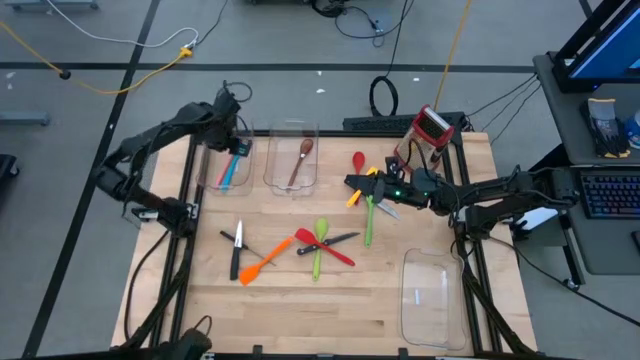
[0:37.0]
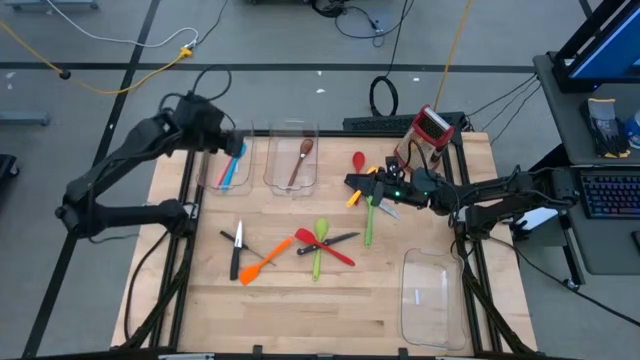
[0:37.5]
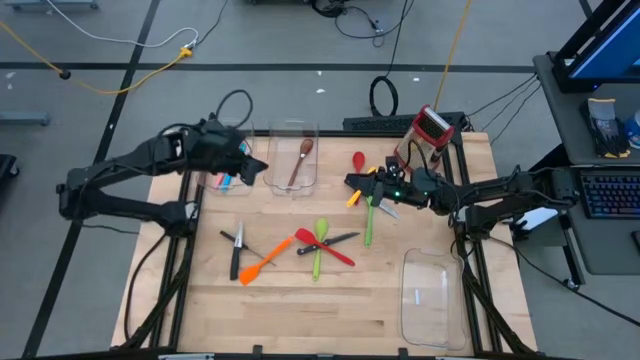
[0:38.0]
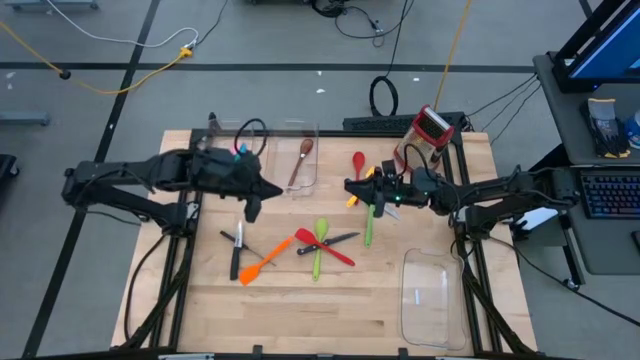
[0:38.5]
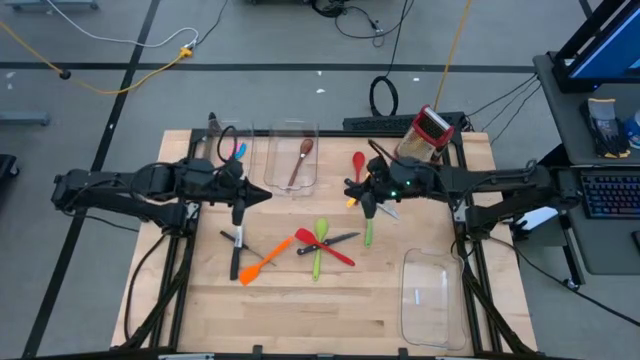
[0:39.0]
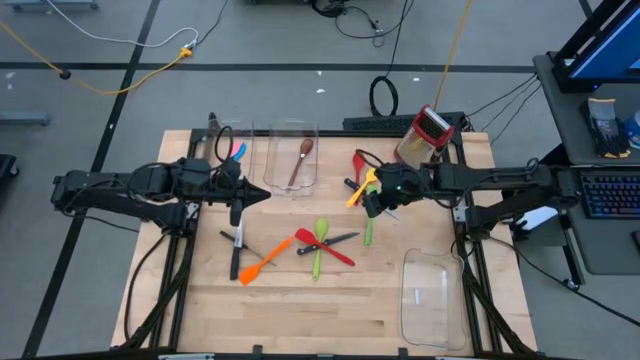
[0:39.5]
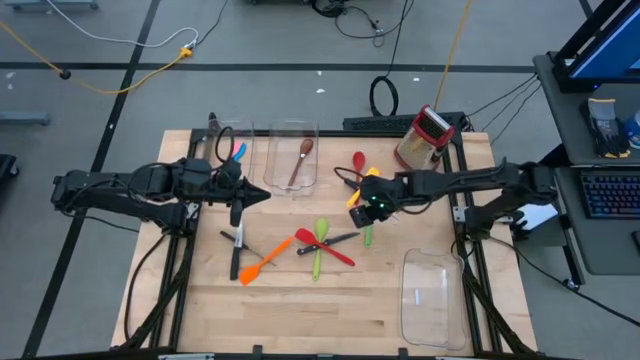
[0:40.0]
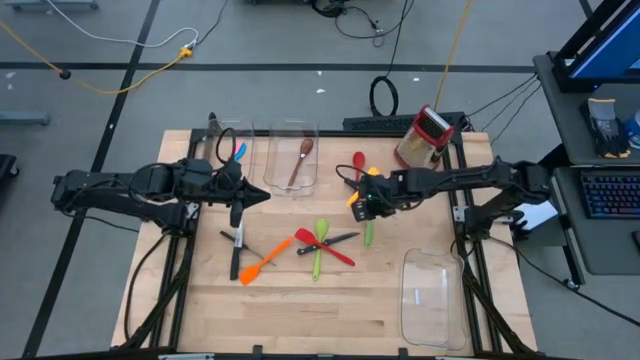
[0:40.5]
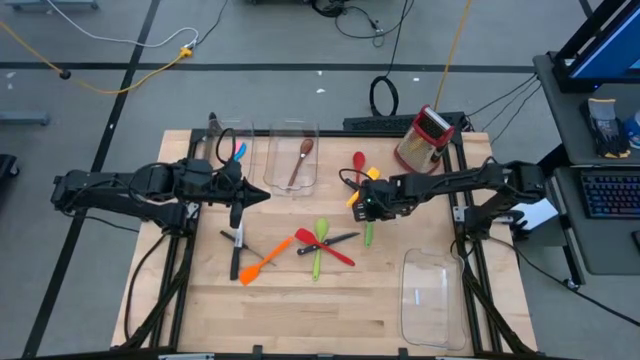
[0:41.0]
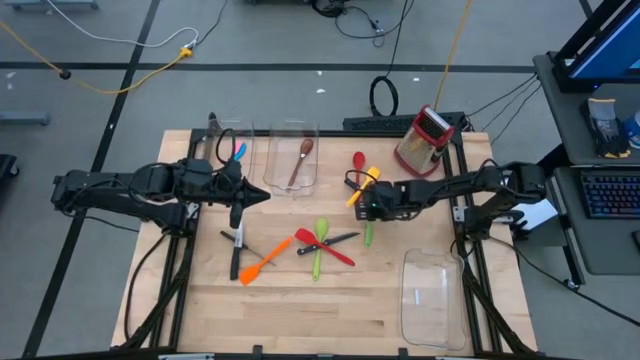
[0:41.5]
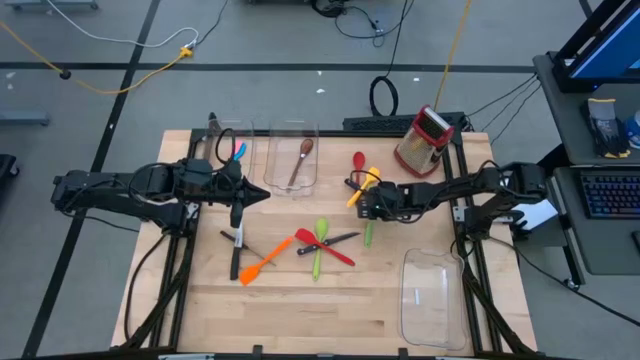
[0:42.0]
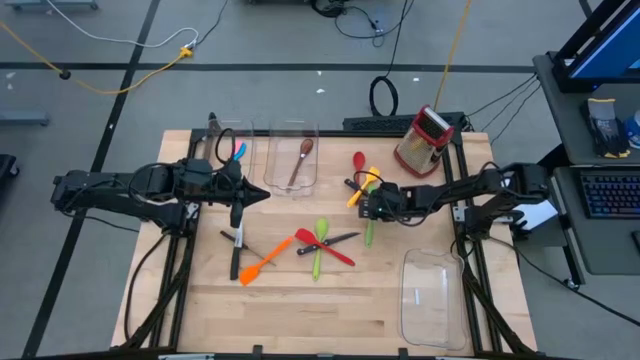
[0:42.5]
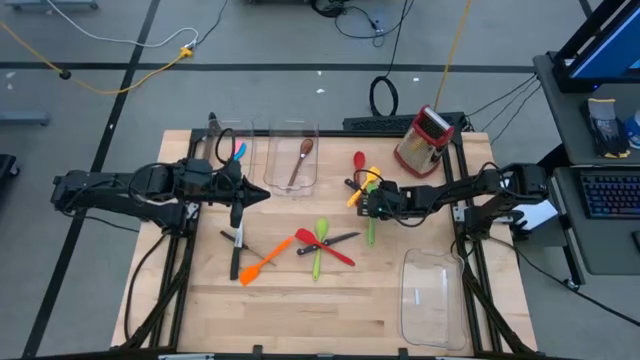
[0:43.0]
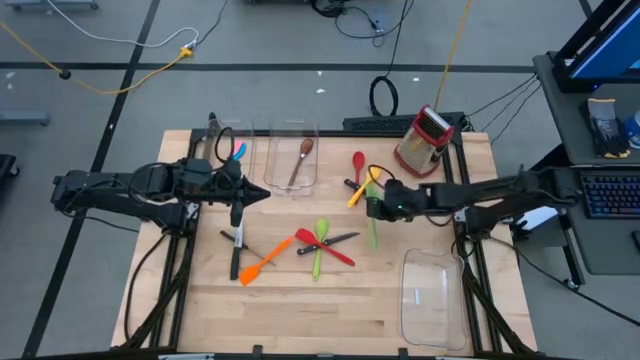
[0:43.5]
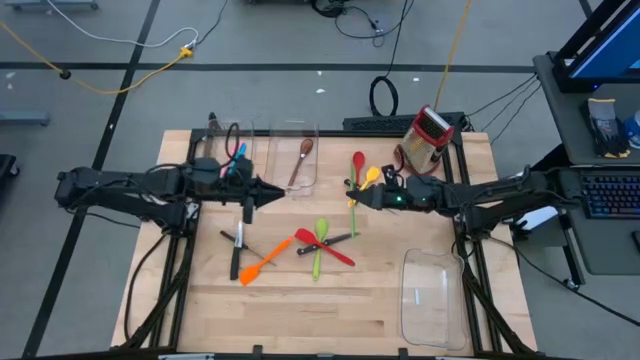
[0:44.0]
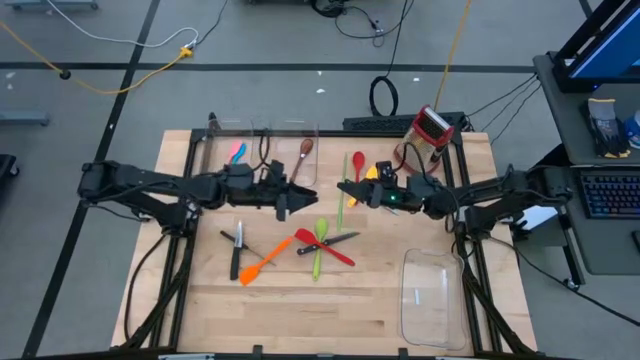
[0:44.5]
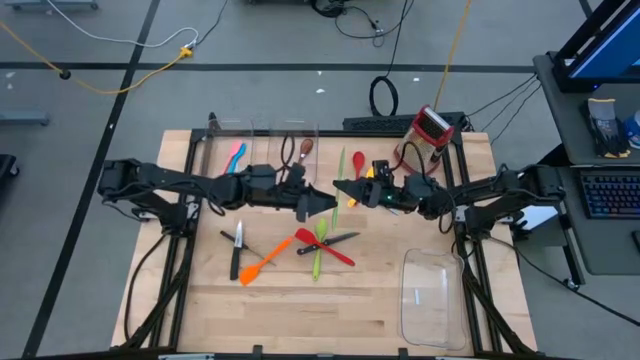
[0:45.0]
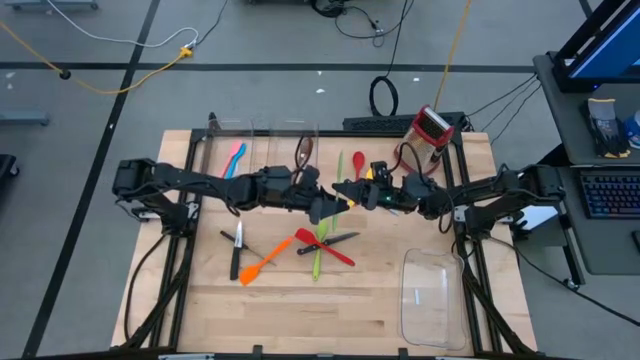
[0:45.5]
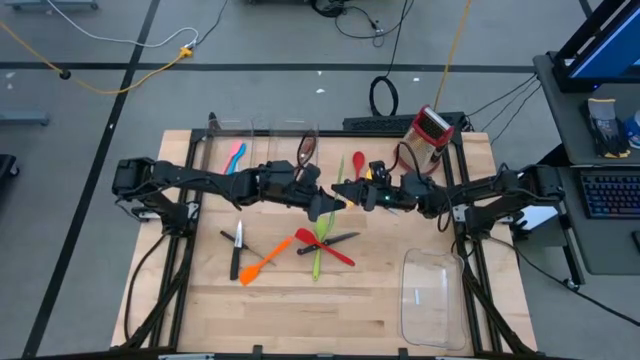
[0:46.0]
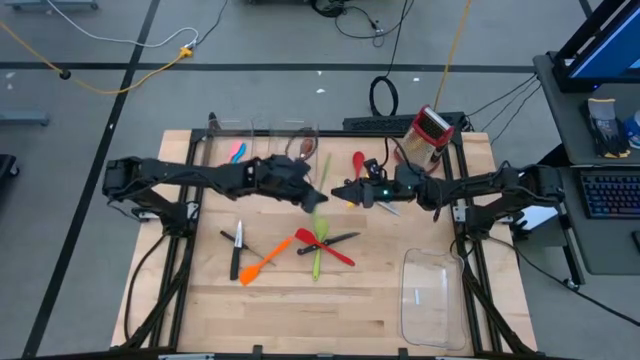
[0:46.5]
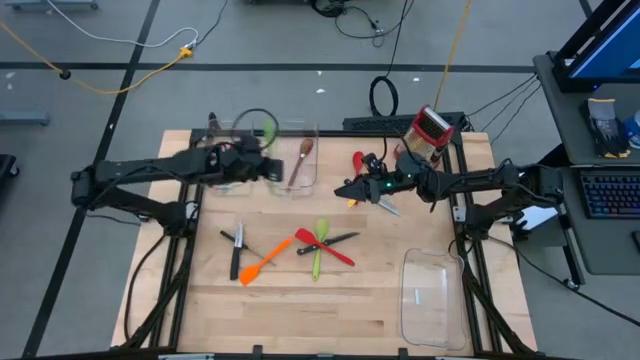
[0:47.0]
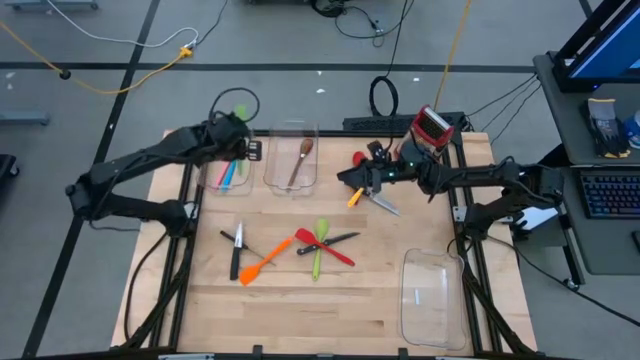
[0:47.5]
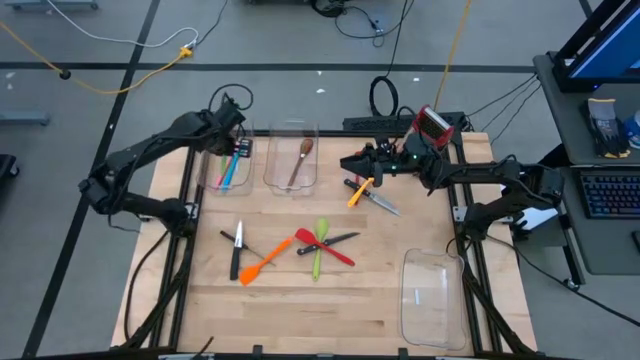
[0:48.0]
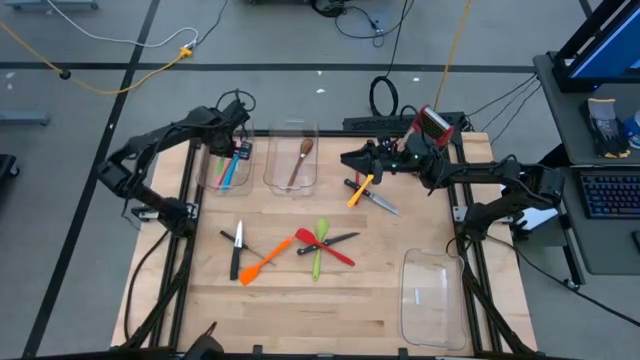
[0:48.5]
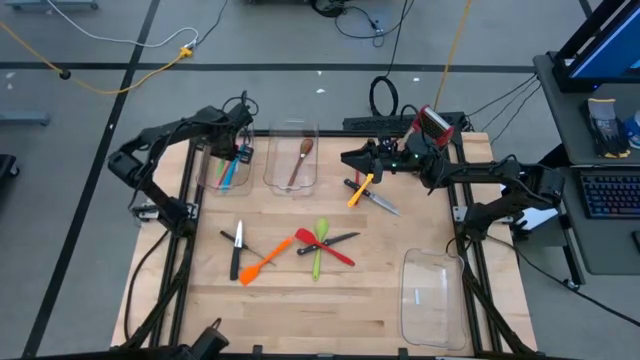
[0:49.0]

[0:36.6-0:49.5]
Task: Pick & Place Kitchen Items
Put the green spatula into the left transparent bin

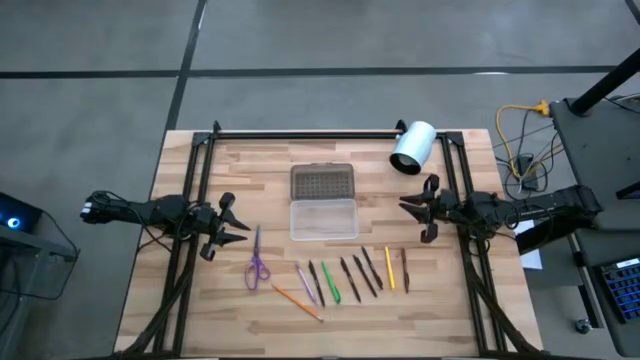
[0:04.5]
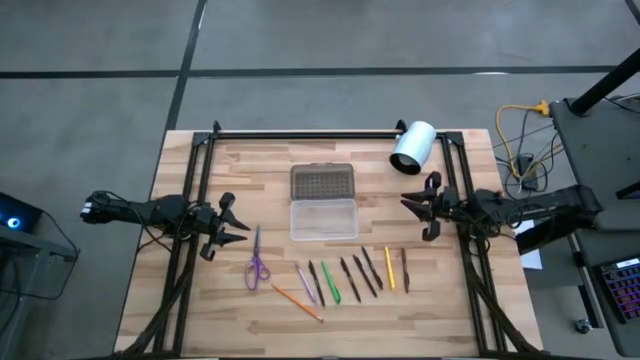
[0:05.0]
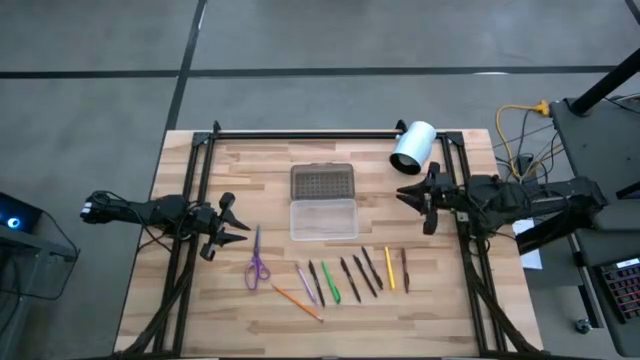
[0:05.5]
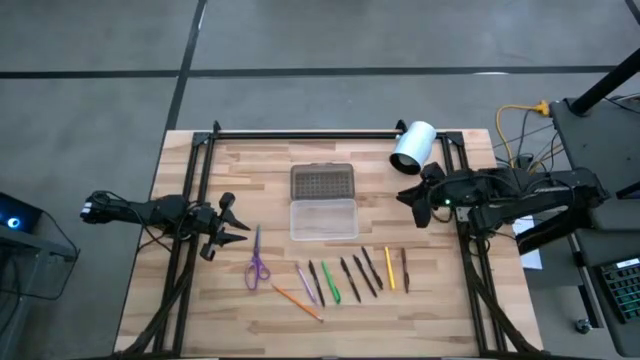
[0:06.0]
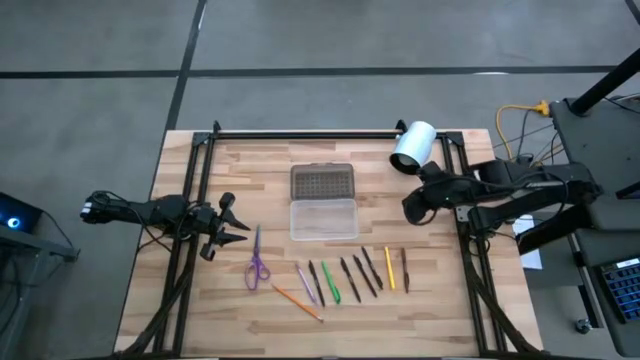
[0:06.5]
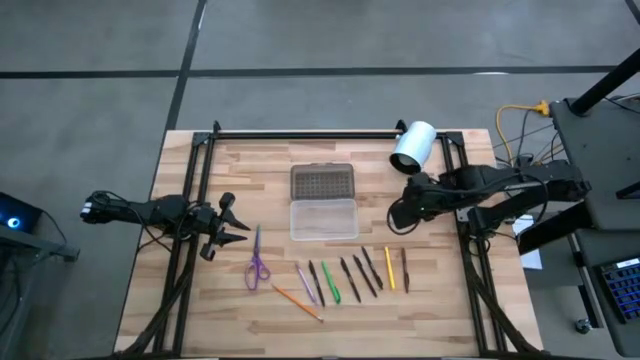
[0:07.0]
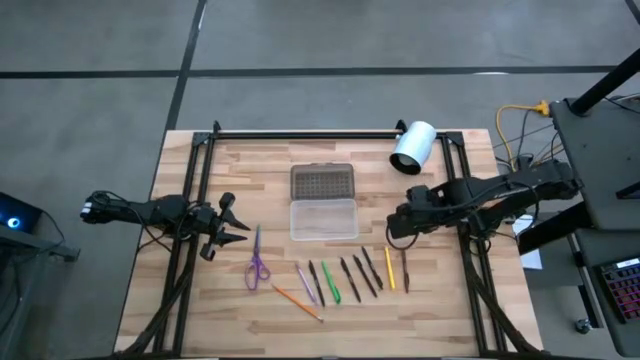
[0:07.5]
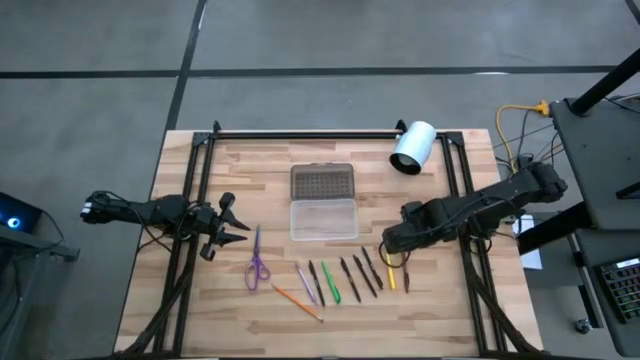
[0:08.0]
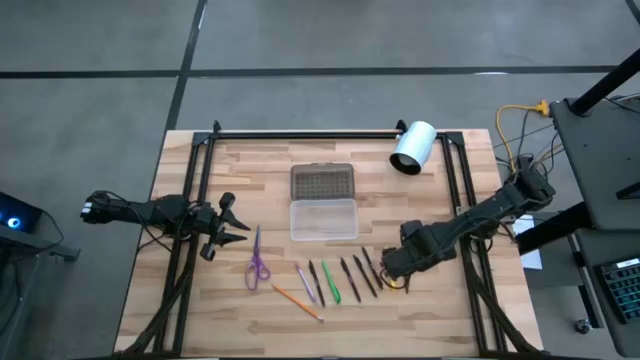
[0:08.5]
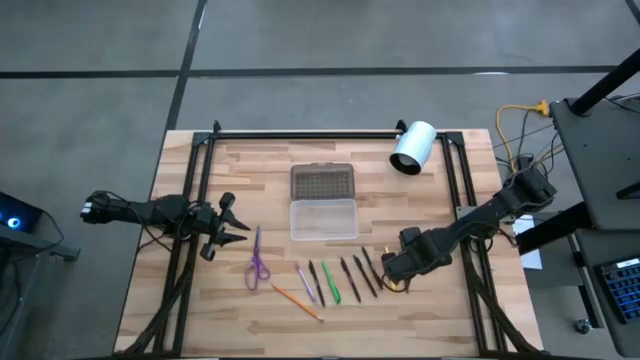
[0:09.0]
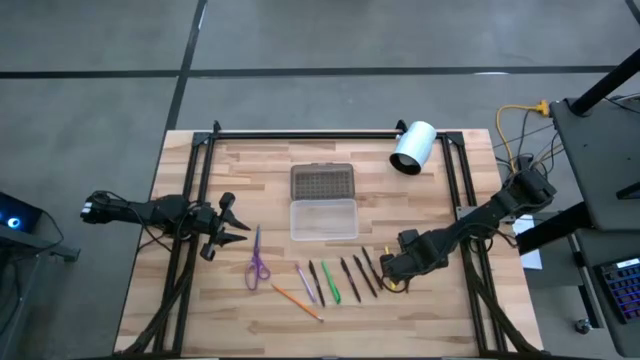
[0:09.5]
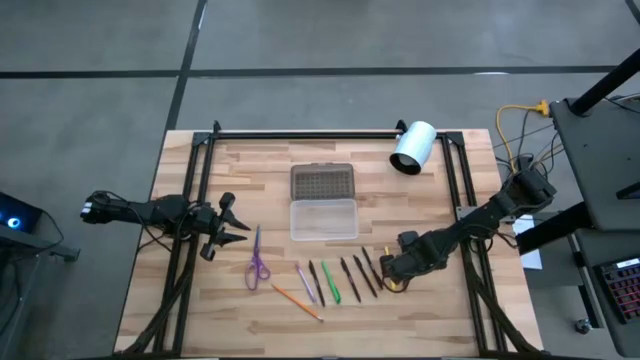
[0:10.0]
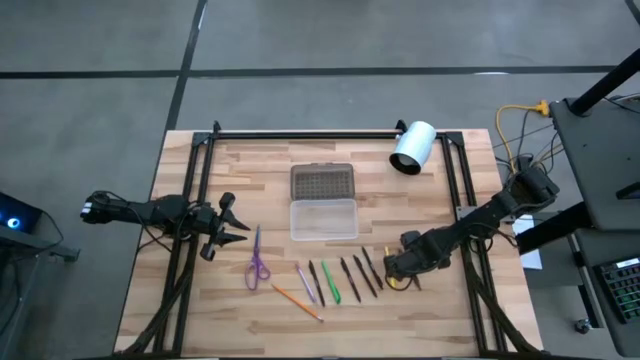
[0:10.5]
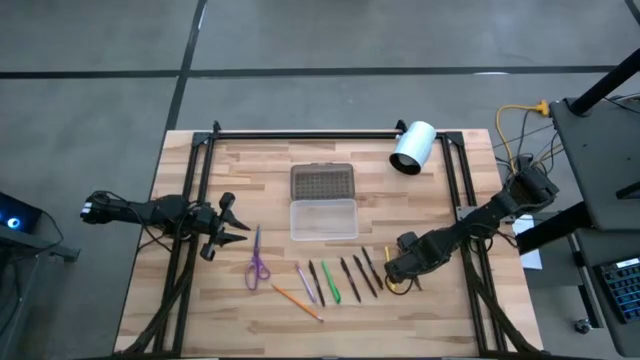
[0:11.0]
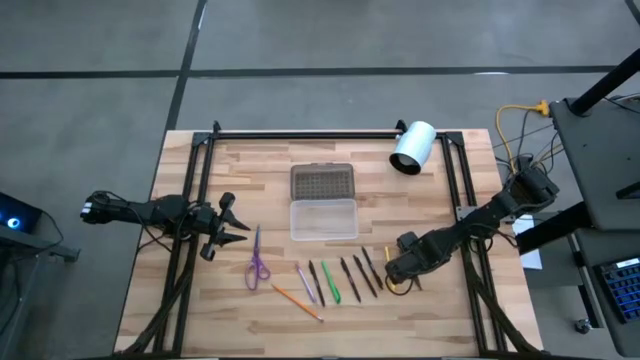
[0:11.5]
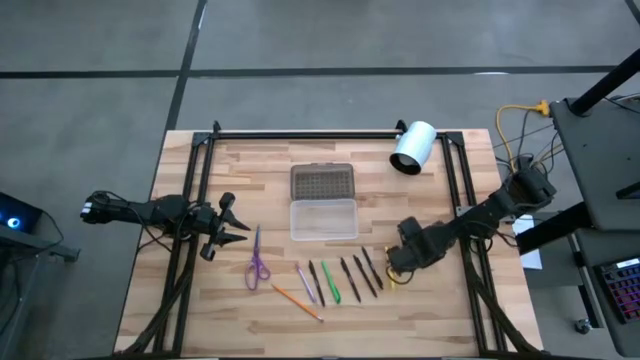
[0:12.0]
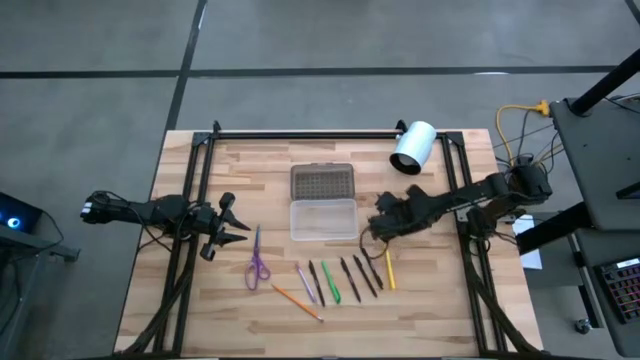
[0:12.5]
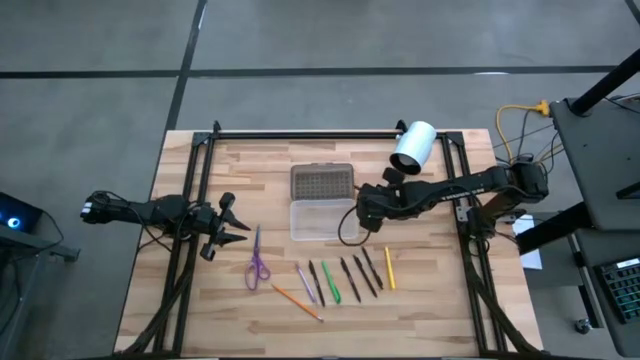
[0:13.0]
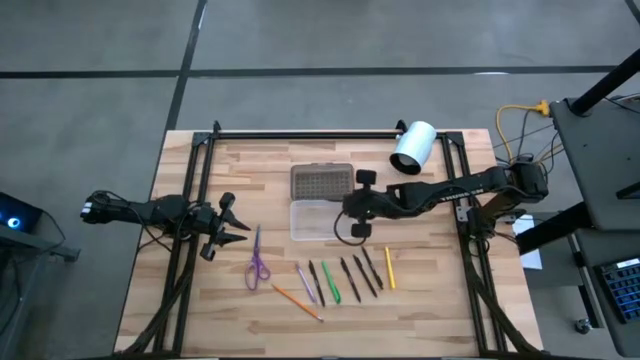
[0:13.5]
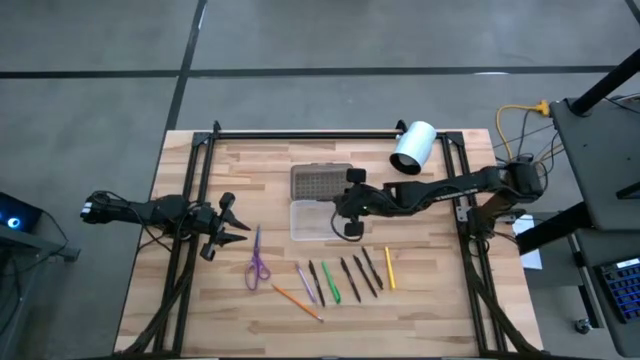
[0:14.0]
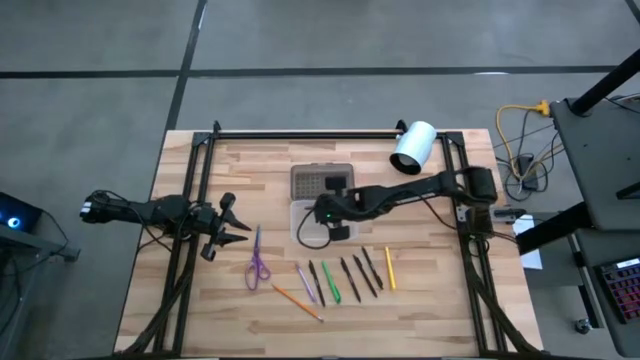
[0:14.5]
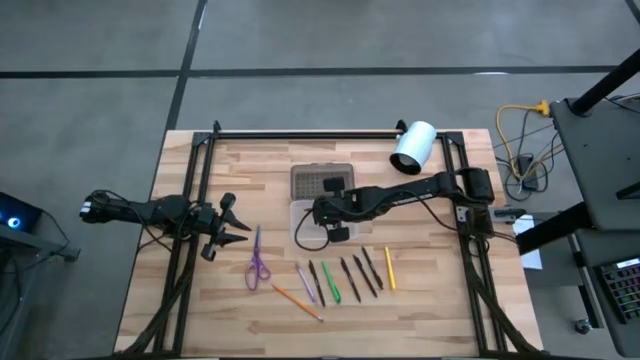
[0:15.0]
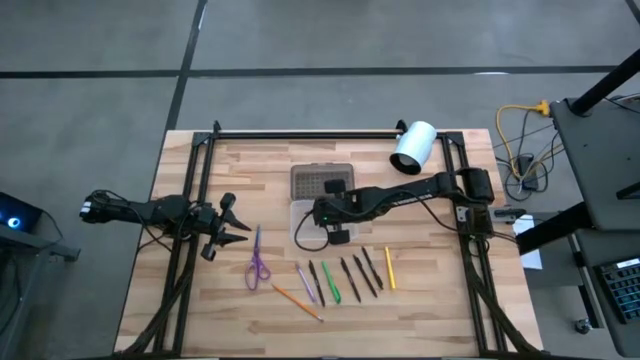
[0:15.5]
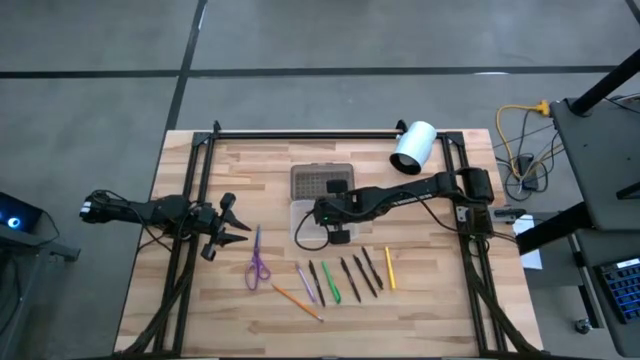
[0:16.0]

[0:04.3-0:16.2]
Task: Pick & place school supplies into a supply box
Put the brown pen into the supply box
